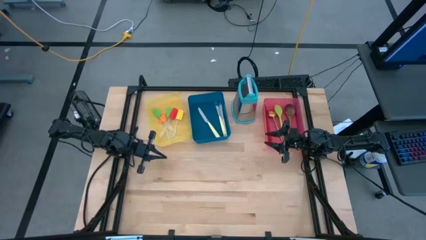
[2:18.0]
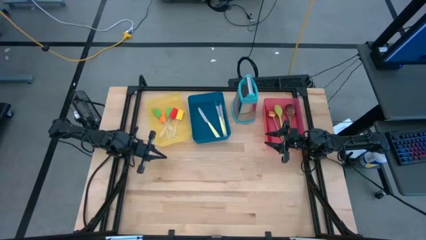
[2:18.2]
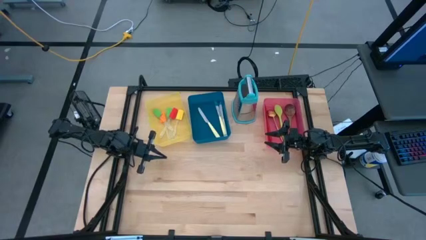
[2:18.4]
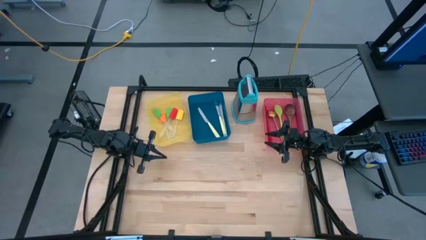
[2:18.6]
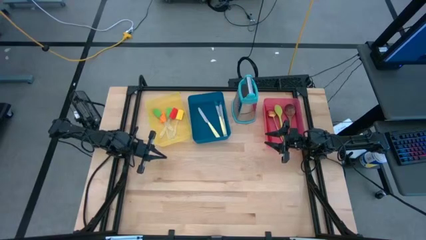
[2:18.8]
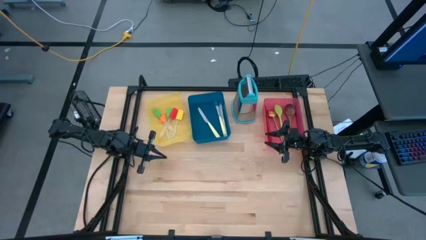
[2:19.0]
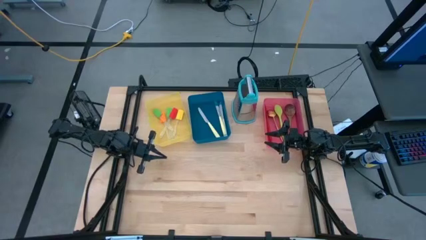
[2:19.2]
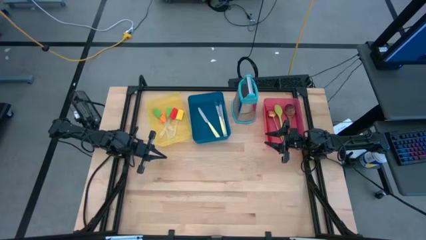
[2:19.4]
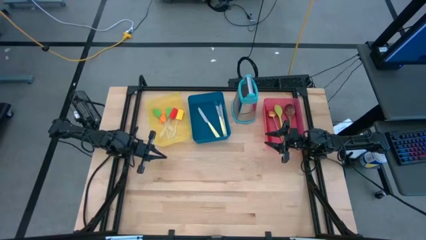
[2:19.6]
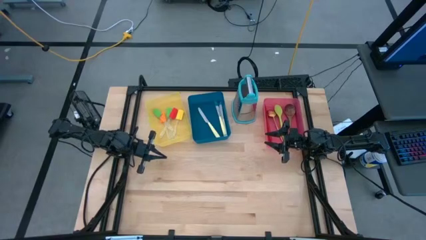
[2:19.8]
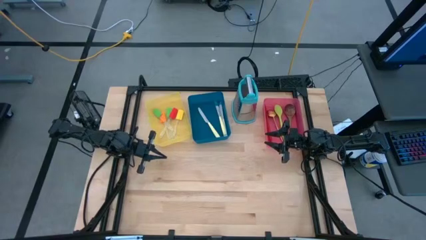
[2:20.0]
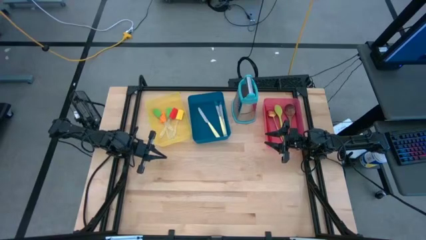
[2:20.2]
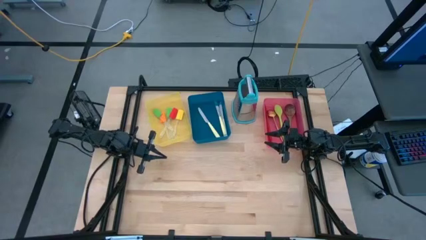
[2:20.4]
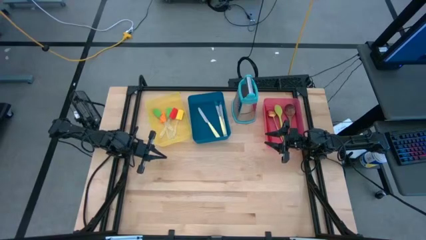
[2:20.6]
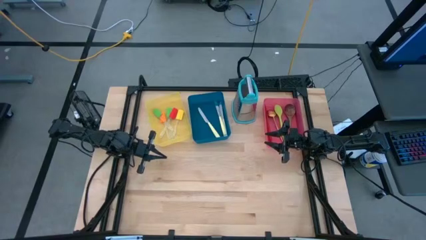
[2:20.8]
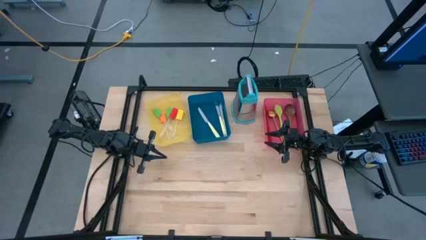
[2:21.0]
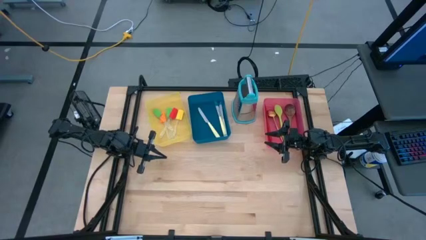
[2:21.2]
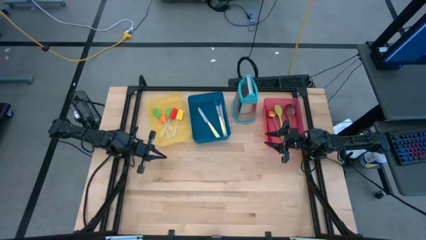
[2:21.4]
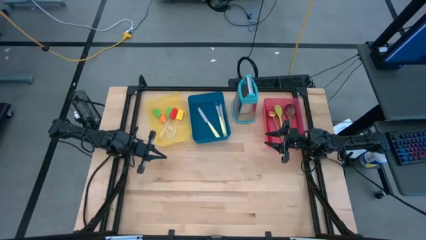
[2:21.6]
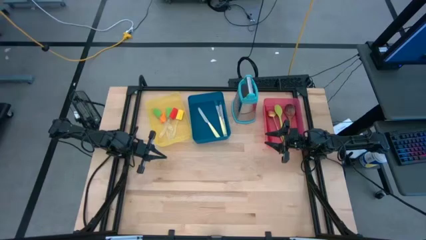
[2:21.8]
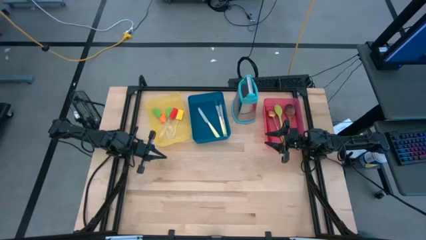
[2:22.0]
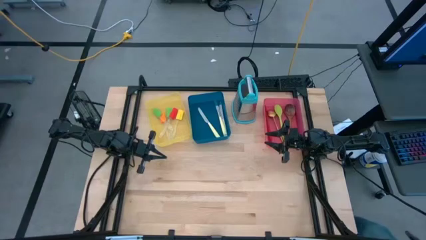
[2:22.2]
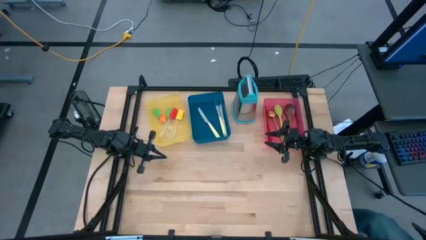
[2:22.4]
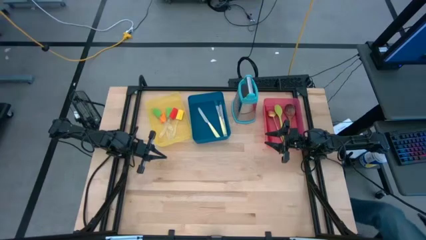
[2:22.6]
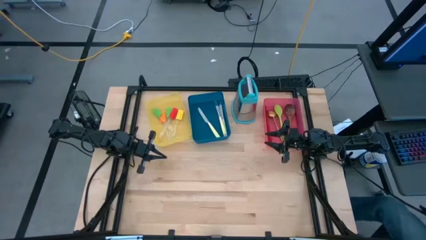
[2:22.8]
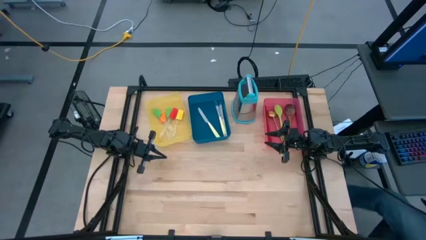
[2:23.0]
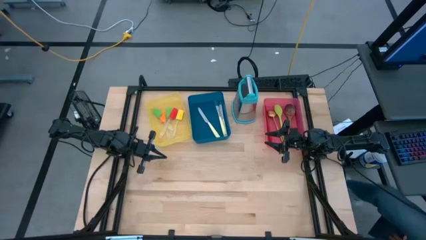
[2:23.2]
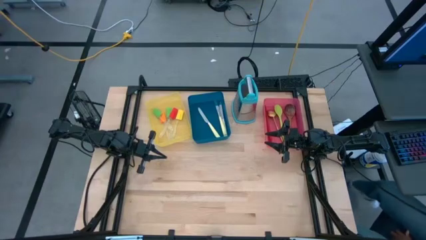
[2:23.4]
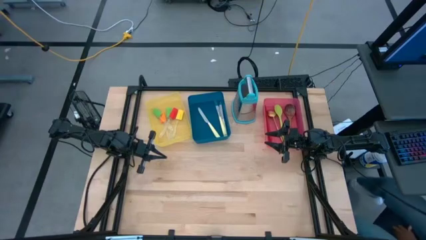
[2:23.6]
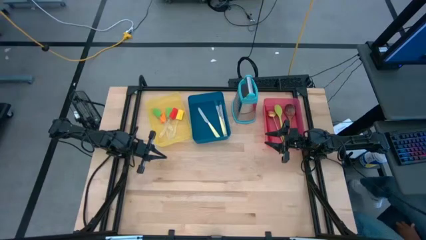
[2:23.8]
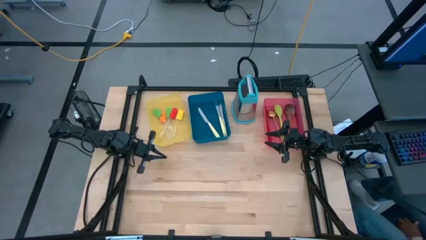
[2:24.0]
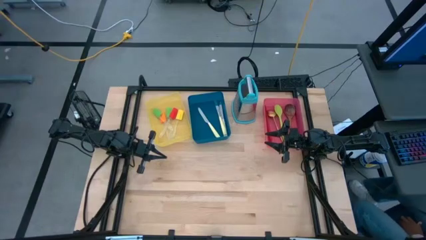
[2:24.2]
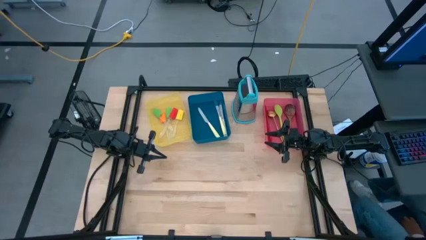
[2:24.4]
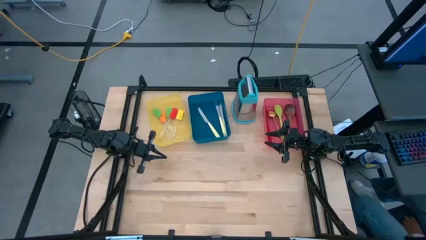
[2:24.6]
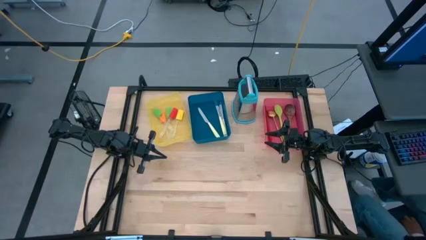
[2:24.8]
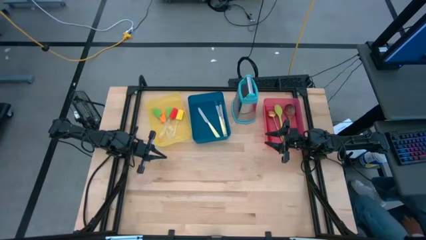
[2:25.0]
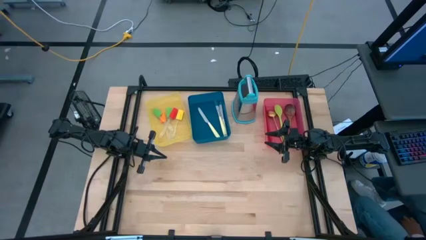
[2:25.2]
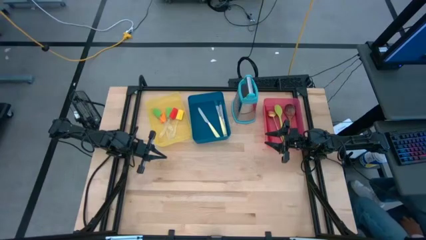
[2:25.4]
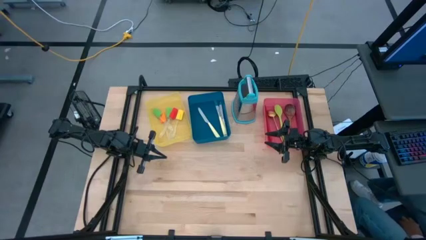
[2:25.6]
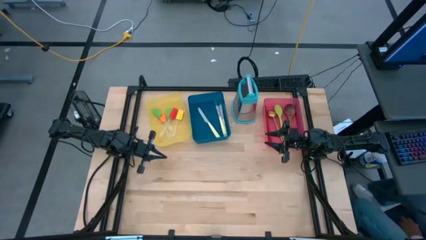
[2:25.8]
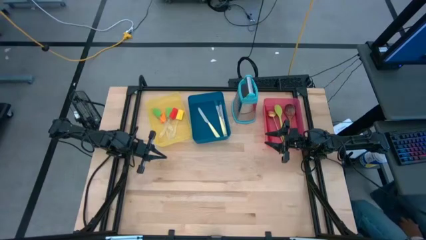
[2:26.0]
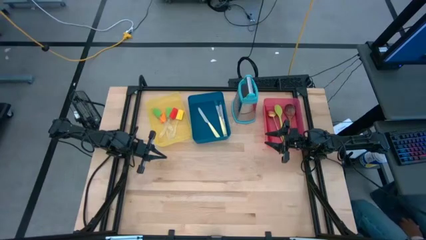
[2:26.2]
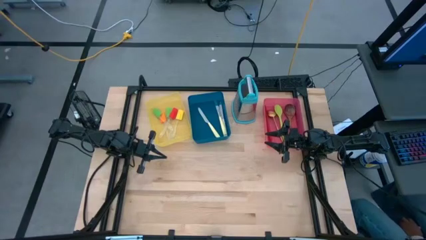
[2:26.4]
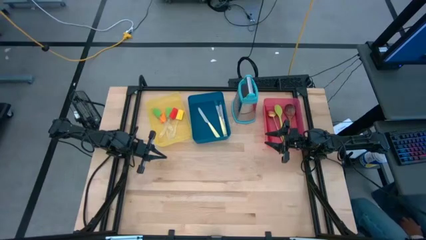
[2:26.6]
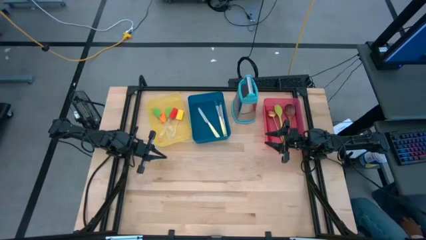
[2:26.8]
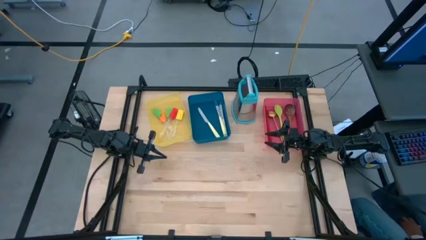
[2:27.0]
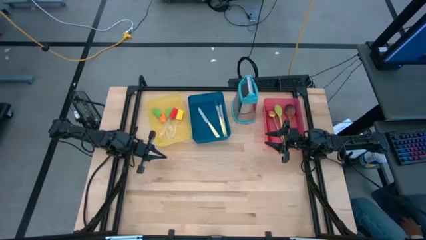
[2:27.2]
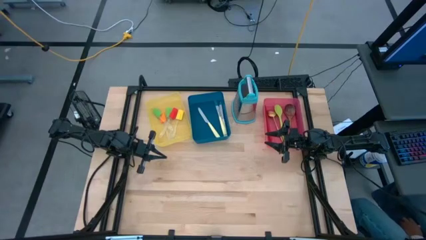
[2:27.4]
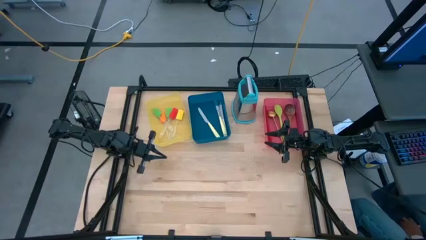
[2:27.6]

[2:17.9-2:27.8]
Task: Pick & Place Kitchen Items
Return to Home Position

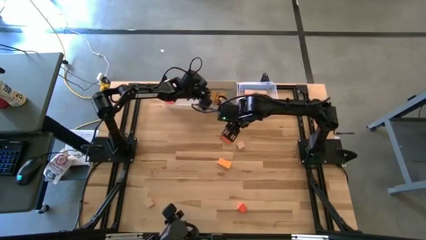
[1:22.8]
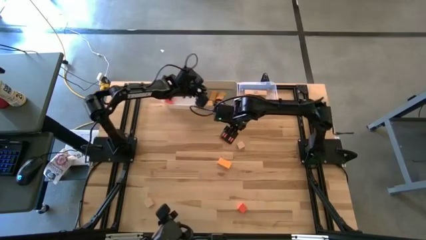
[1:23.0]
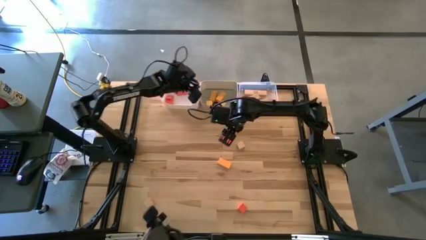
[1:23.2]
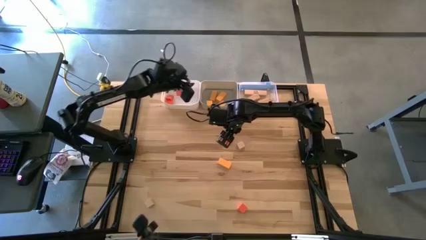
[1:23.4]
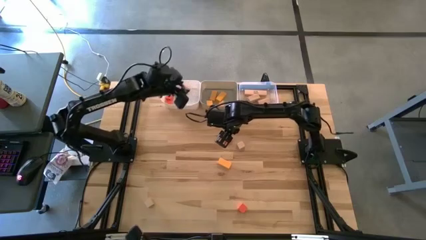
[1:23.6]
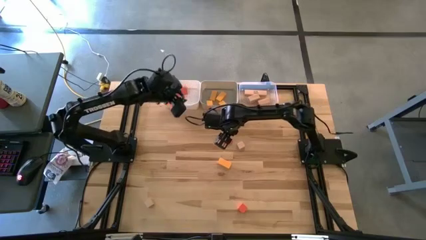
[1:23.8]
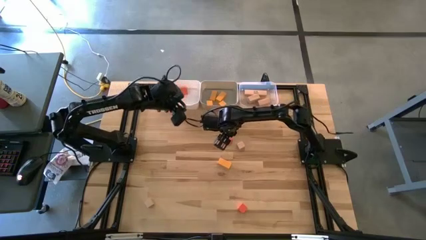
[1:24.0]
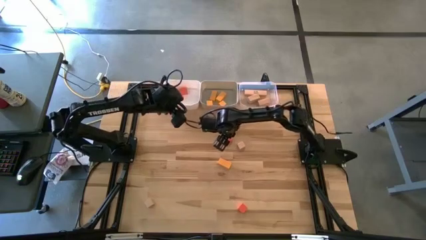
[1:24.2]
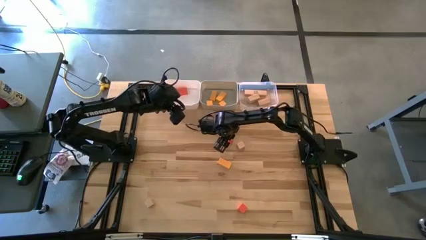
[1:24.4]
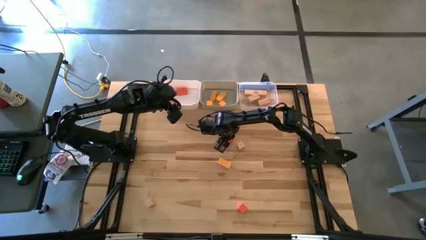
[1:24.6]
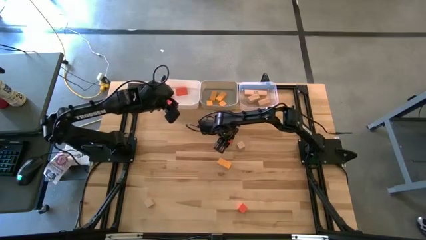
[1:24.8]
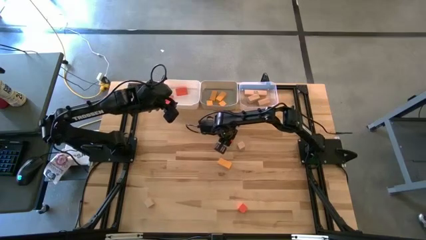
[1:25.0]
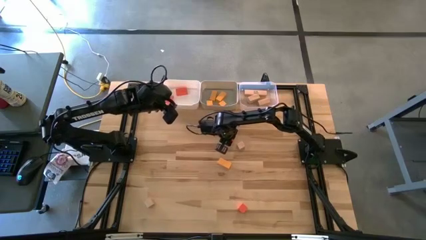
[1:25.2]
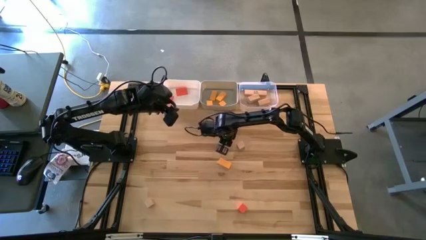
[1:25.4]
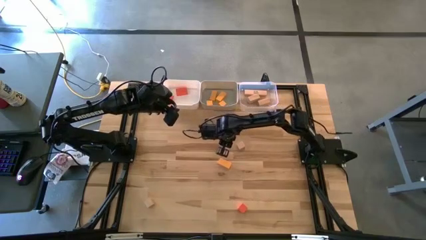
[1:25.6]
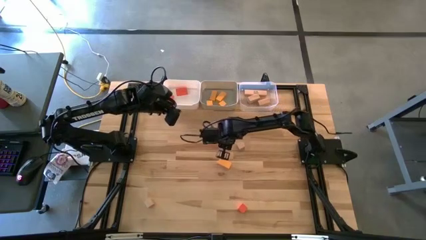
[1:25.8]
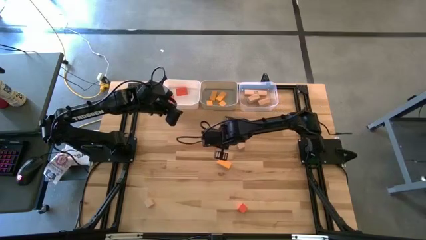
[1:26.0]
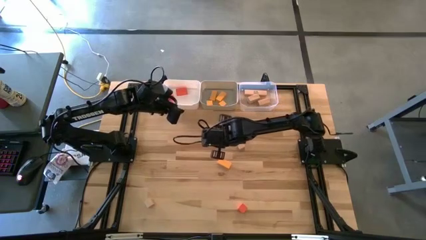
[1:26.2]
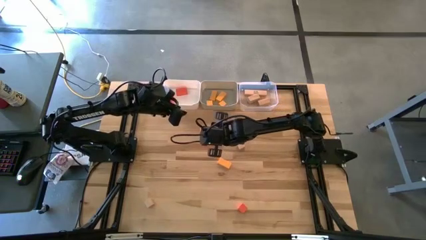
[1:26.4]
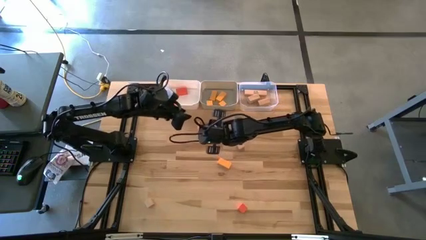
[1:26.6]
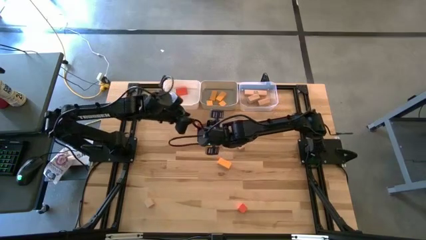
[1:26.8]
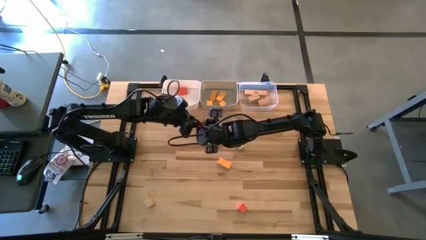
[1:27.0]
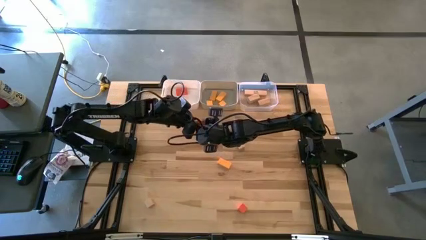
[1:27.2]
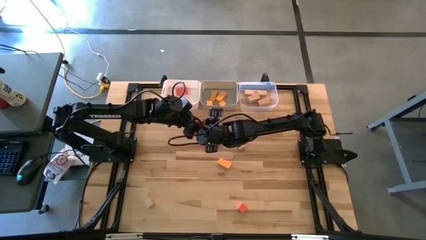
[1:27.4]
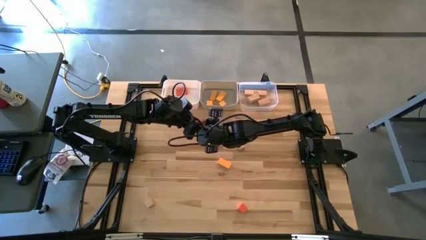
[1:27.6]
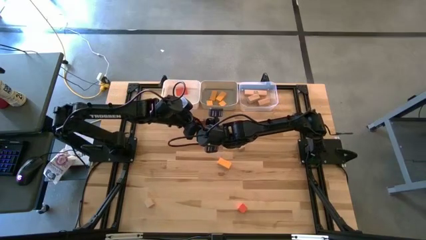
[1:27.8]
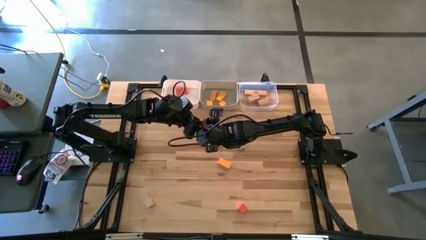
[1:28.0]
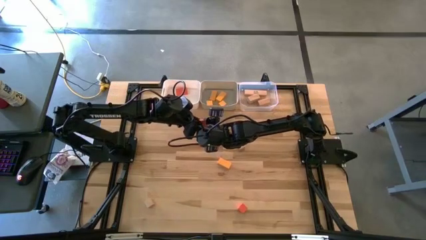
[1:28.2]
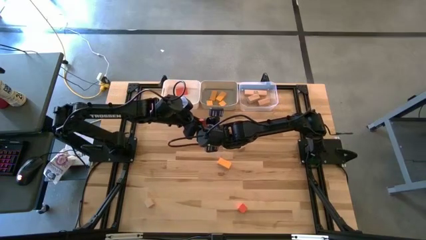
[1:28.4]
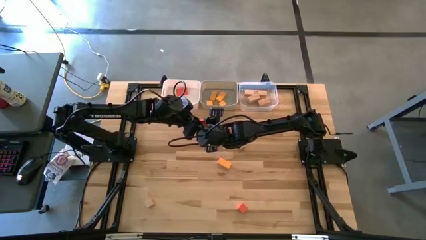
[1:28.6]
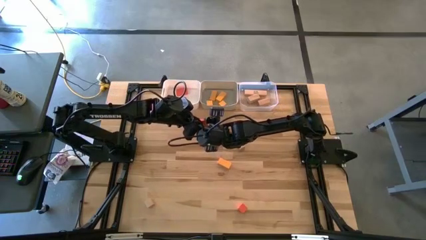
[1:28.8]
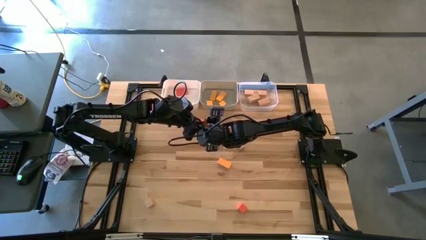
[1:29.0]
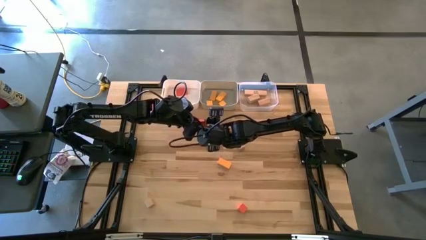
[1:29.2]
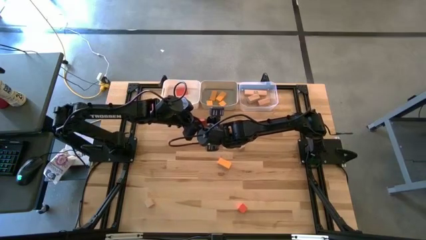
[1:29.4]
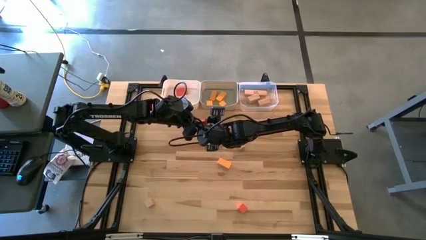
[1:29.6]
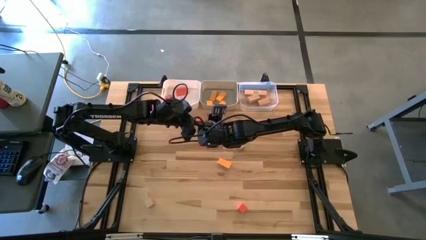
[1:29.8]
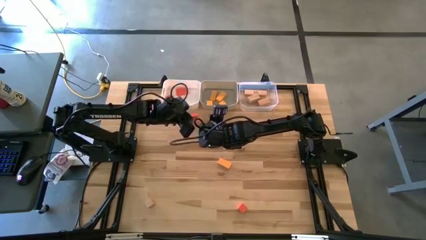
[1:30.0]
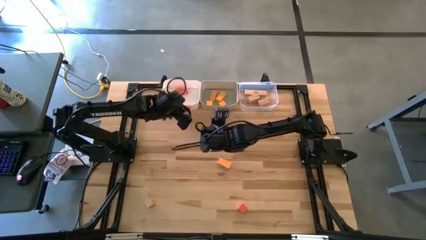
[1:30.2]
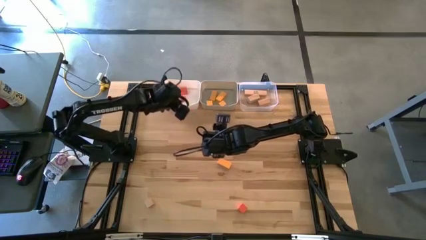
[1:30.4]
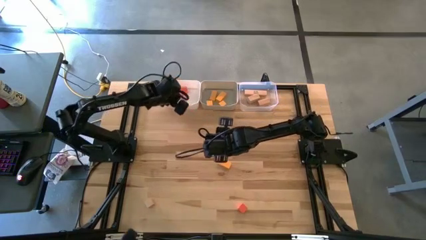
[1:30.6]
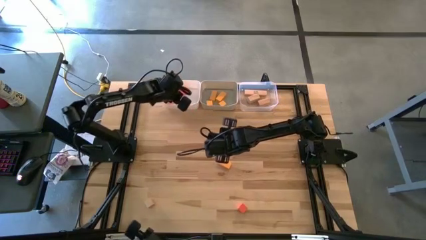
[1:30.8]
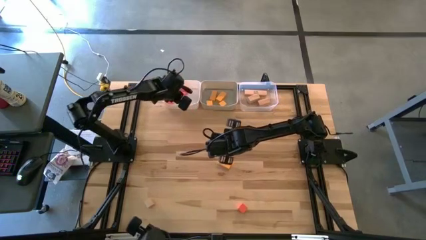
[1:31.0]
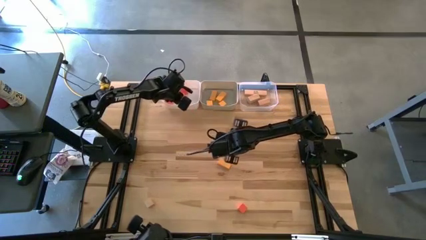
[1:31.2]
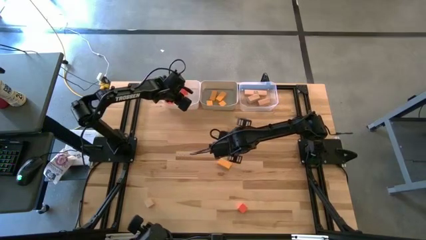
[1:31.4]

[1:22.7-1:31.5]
Task: Sort & place blocks by color
Put the orange block into the white bin
